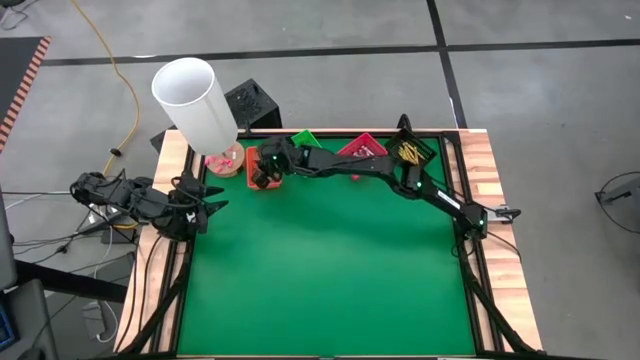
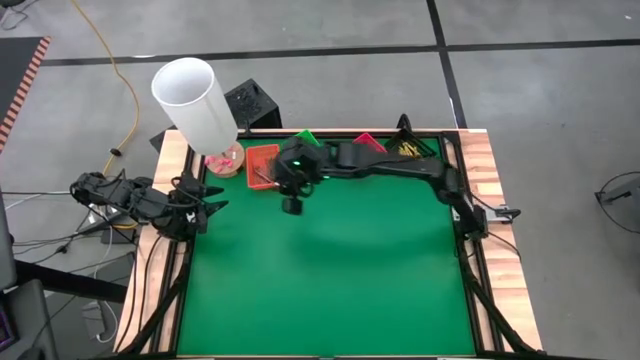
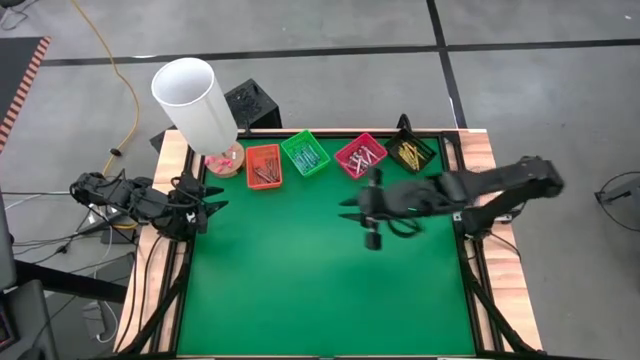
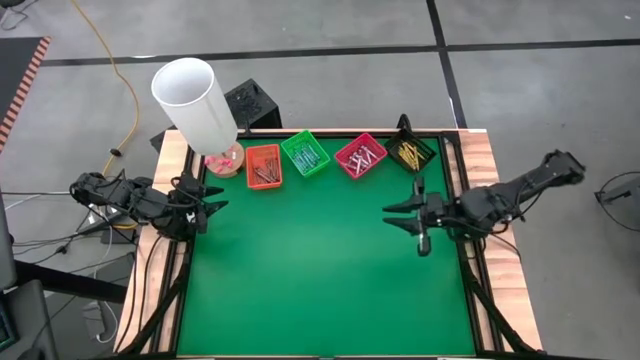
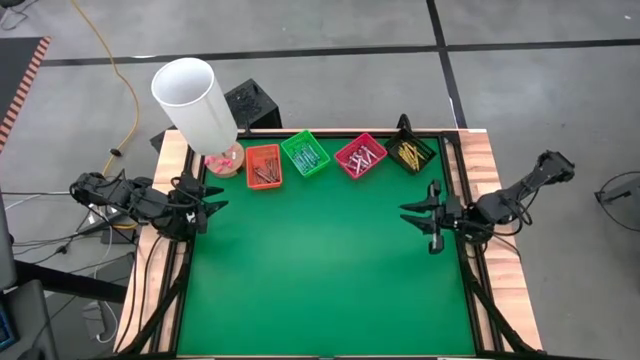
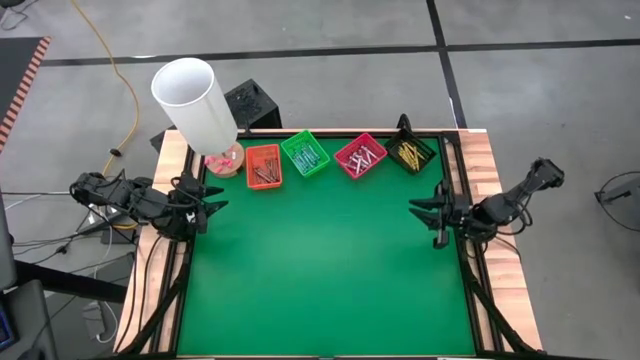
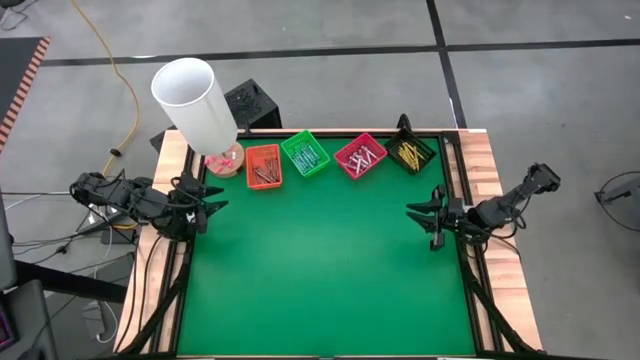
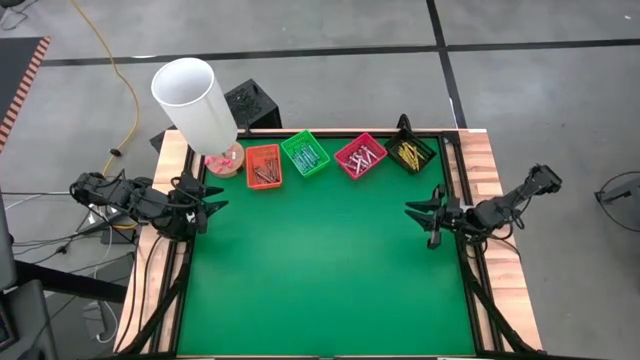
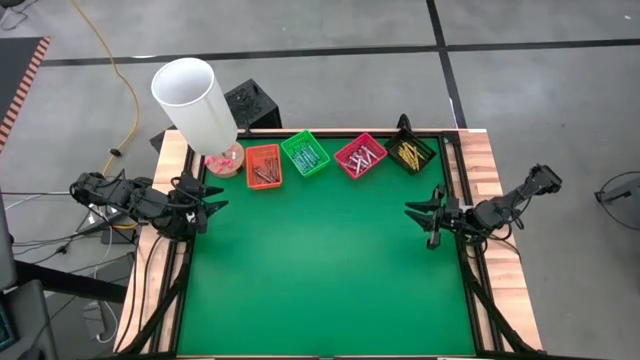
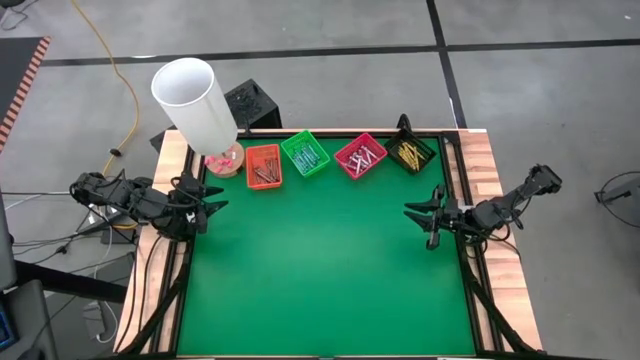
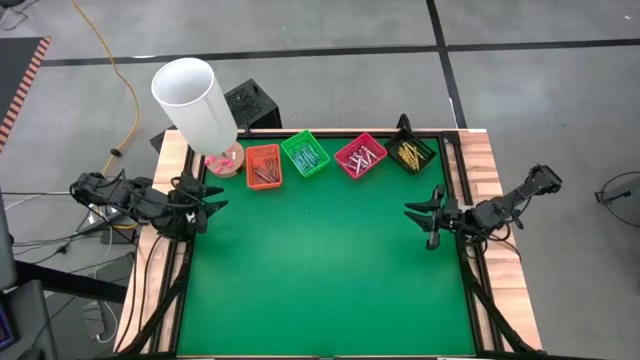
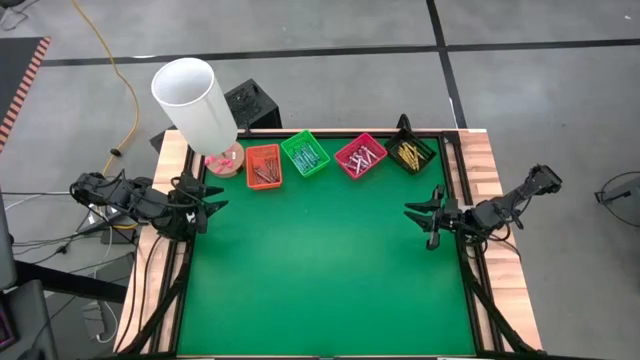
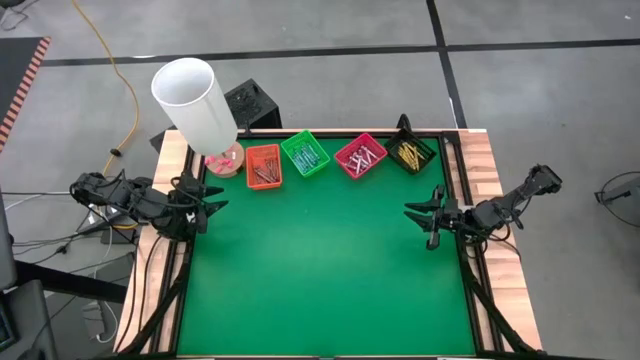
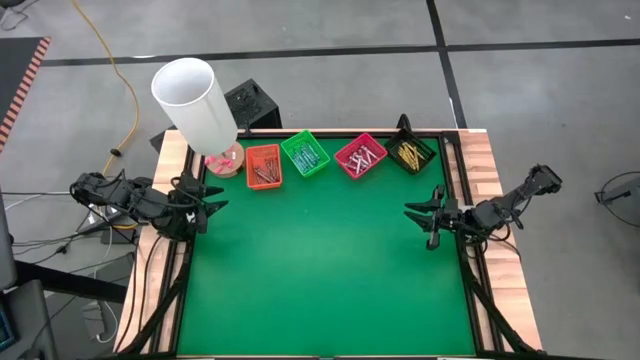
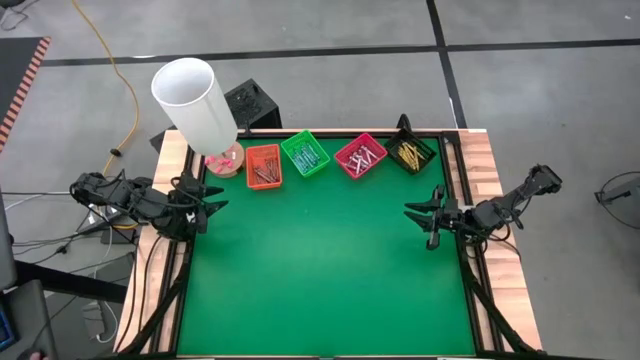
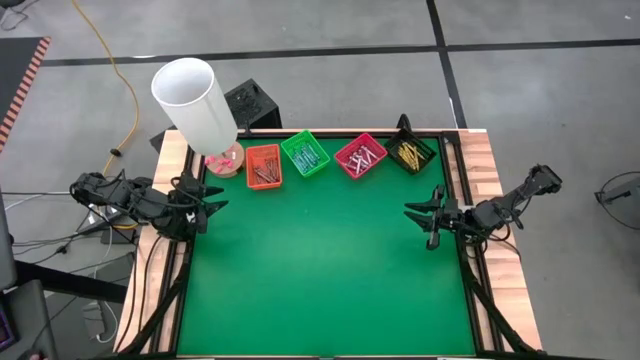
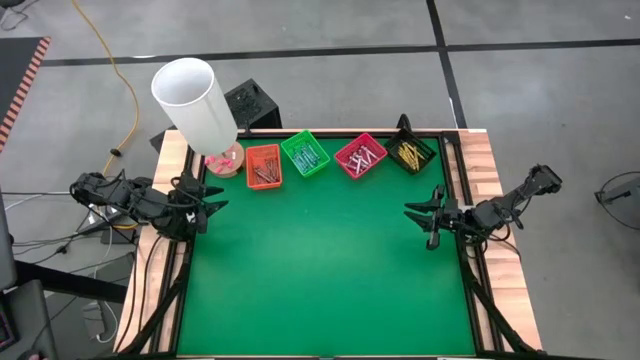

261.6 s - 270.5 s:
Task: Sort crayons
Return to Home Position

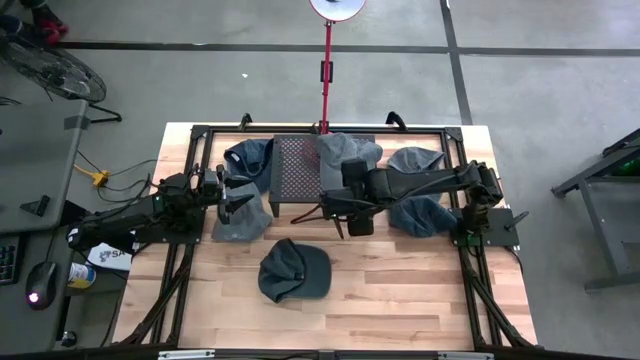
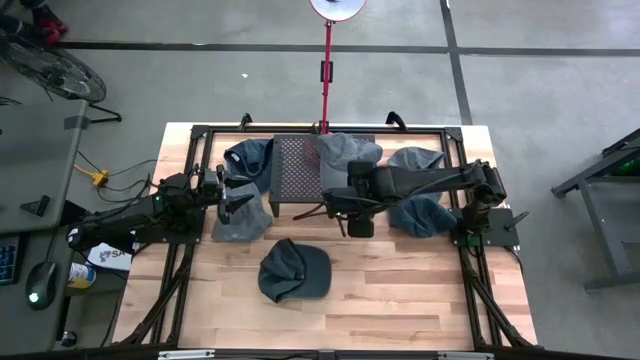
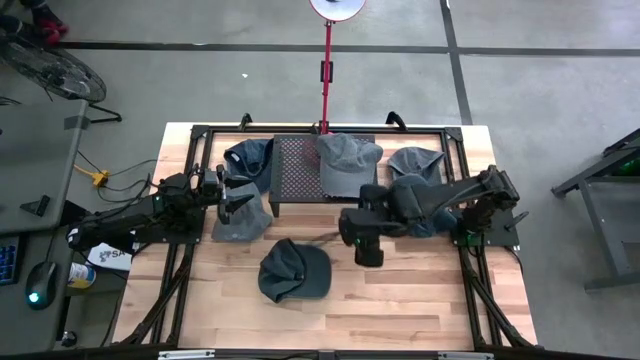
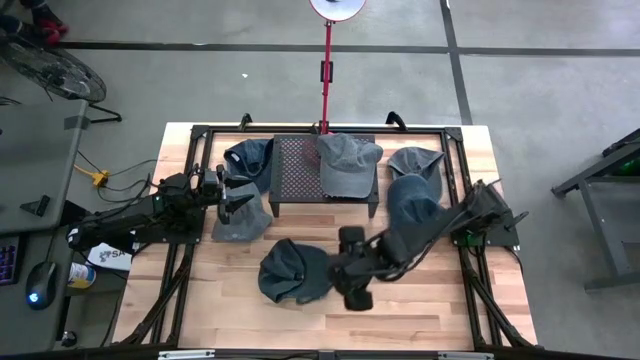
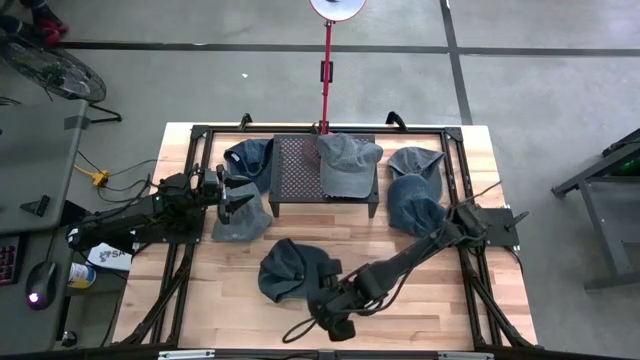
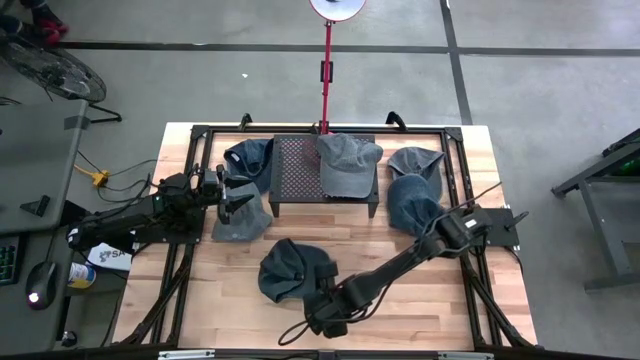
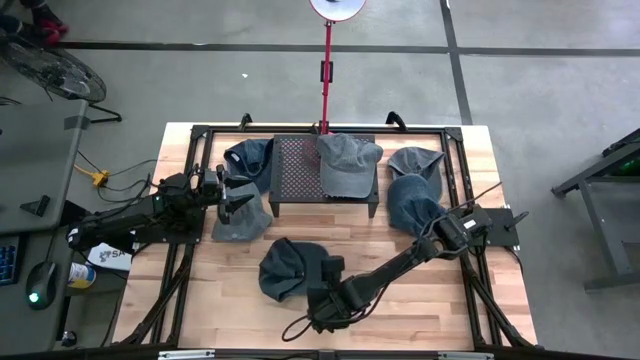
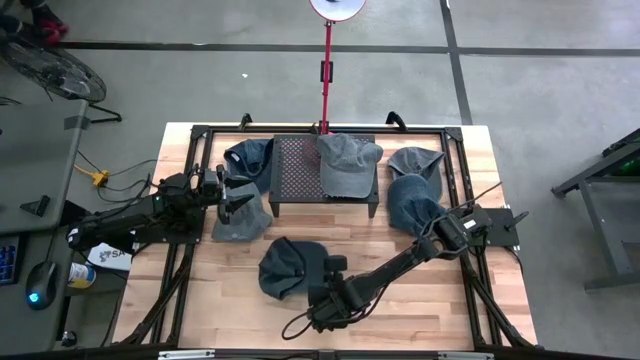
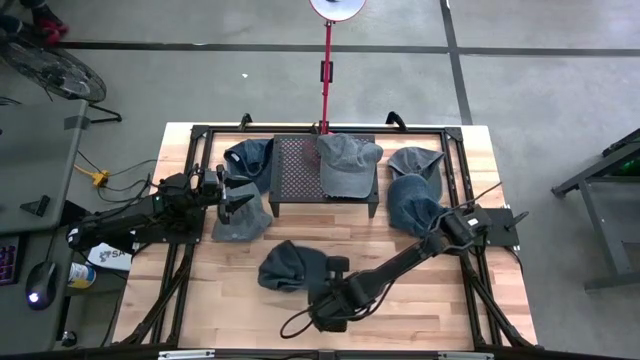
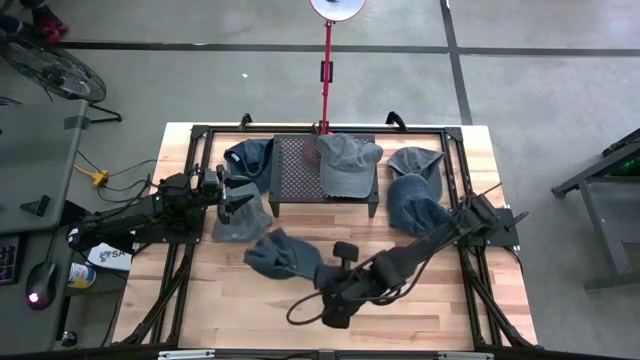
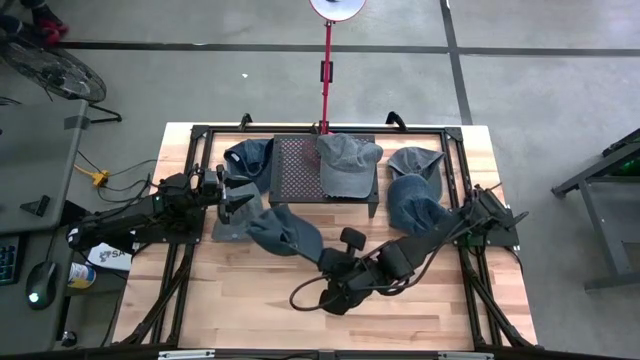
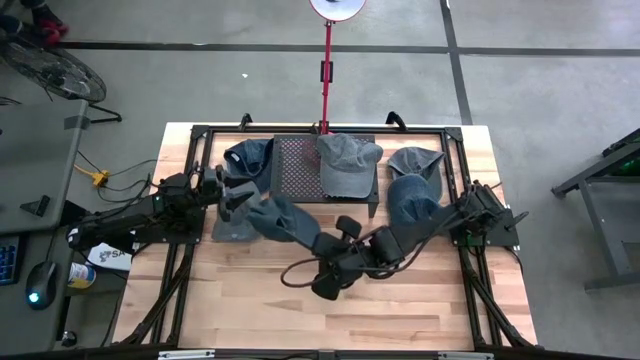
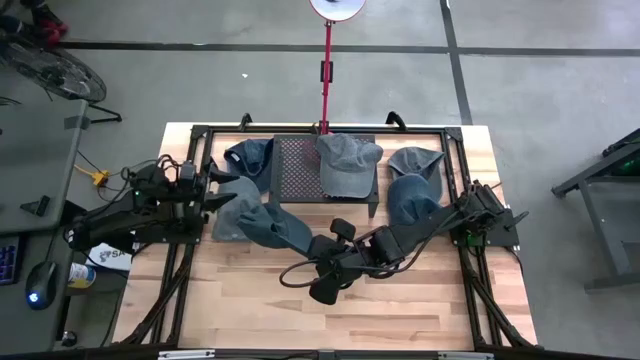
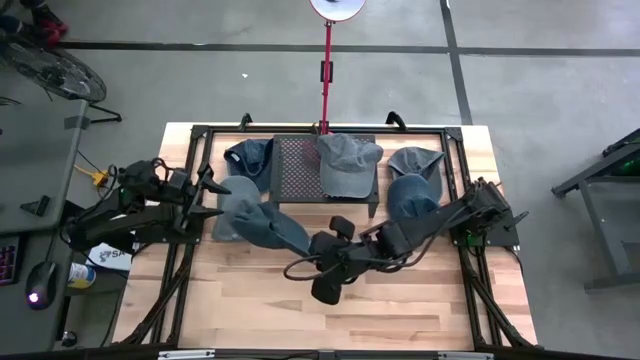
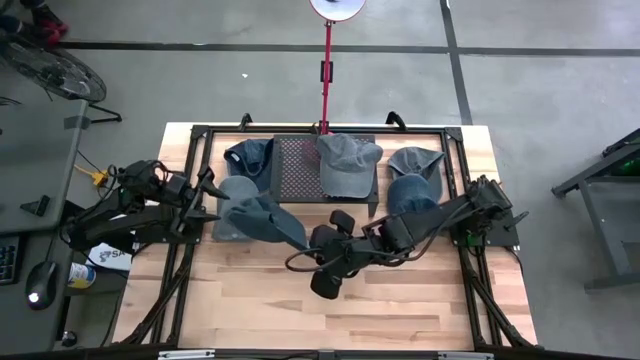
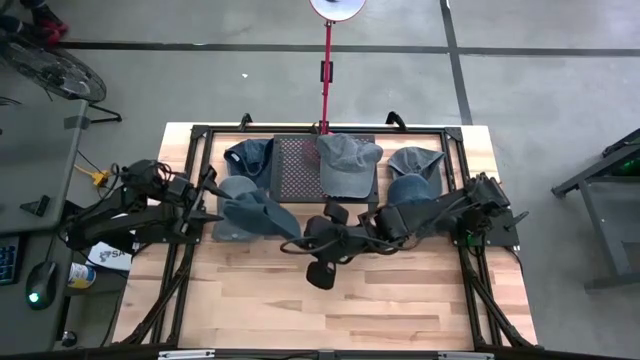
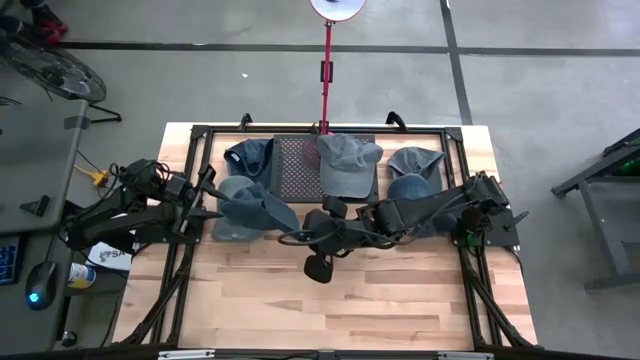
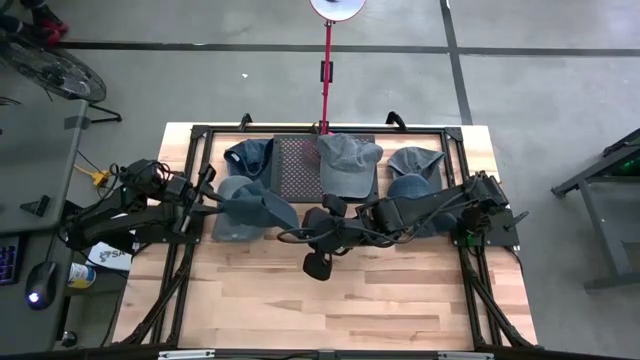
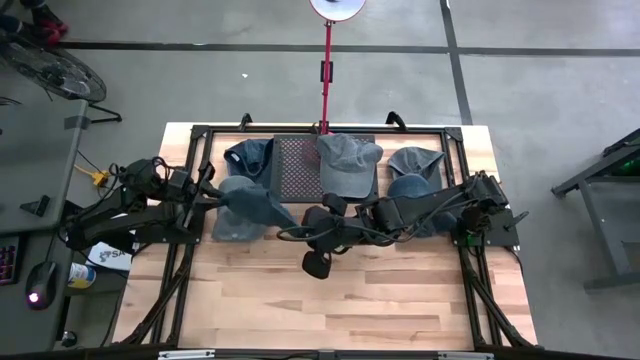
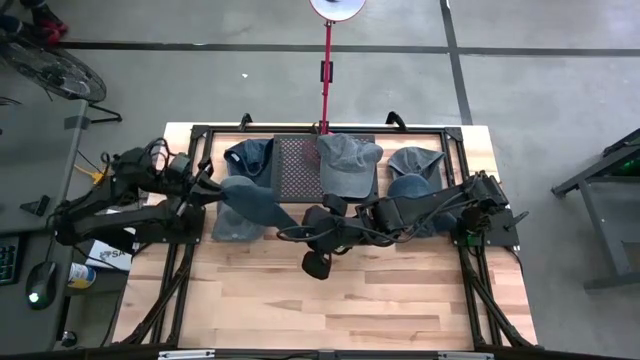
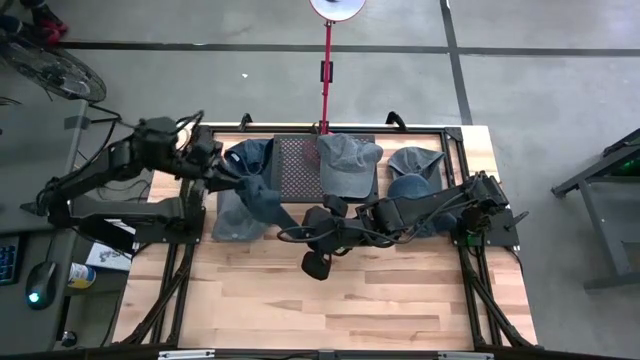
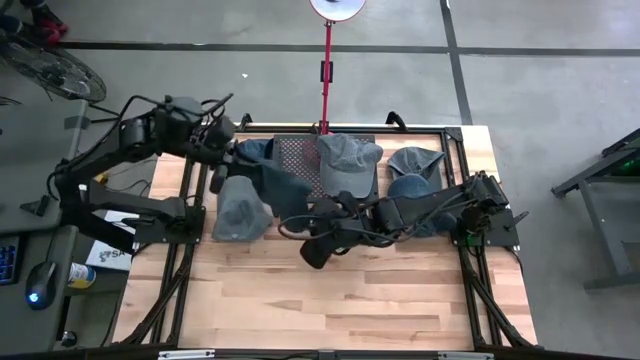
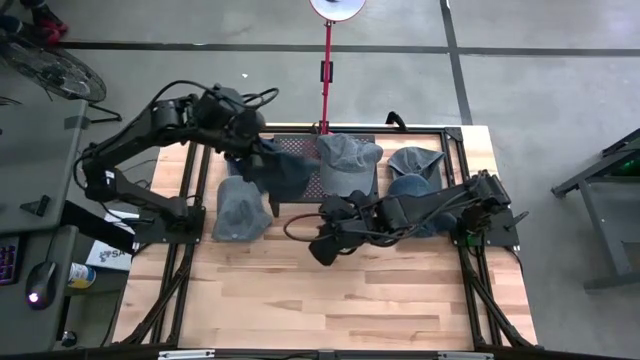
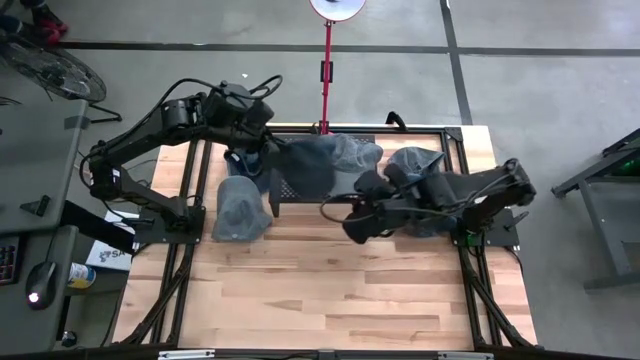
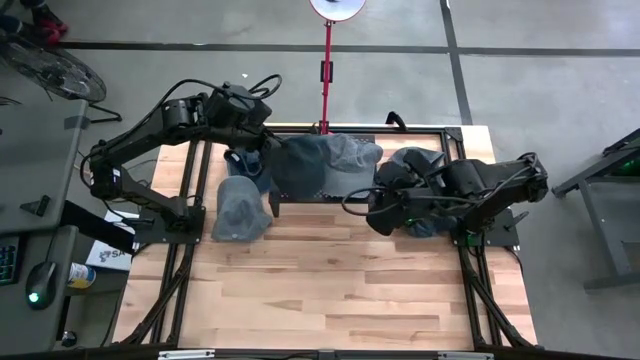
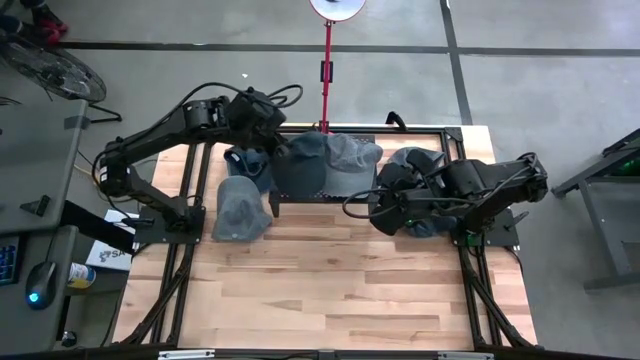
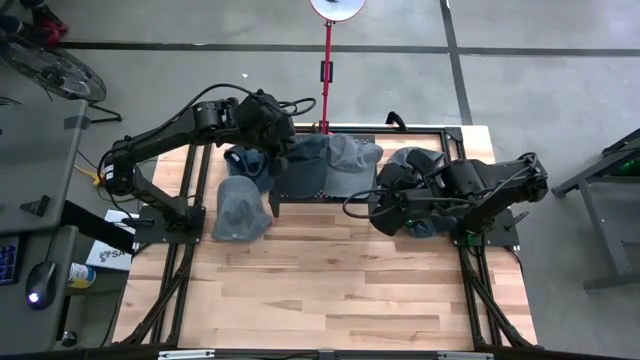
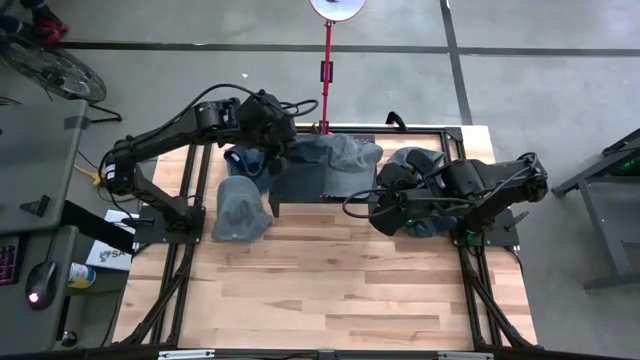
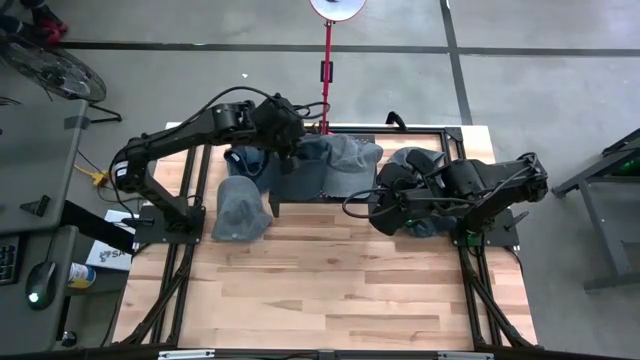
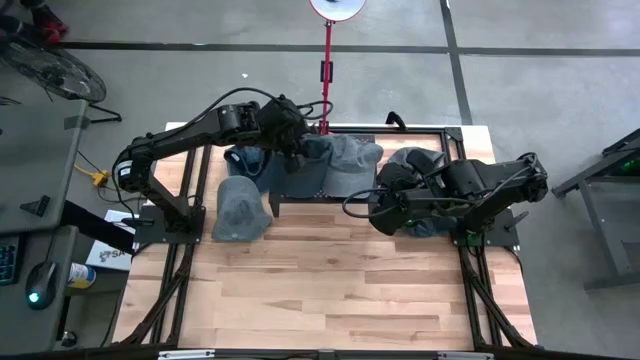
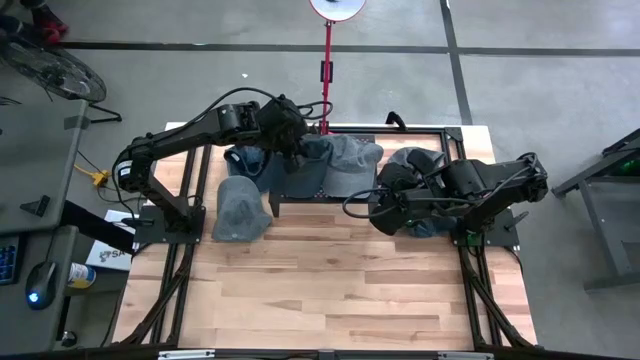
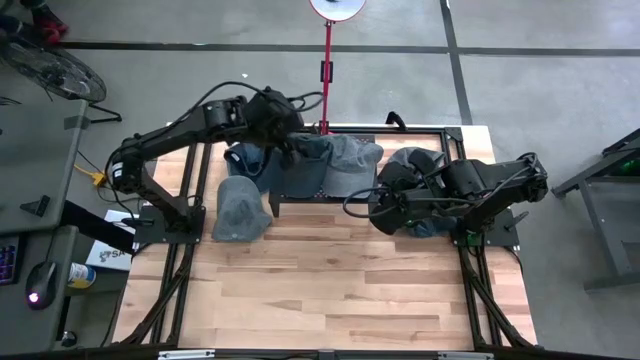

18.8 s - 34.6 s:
Task: Pick & Place hat
Put the lower left black cap on the shelf
